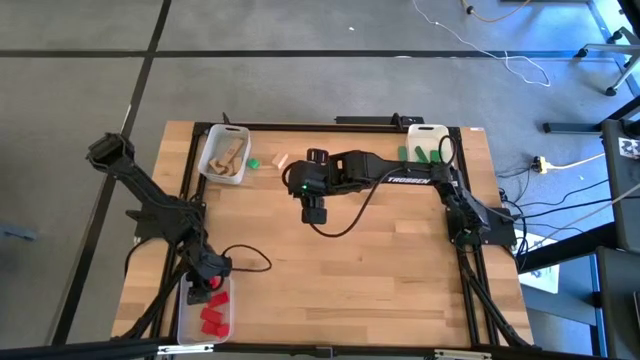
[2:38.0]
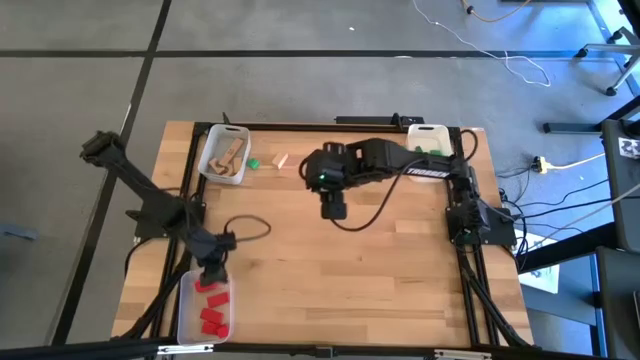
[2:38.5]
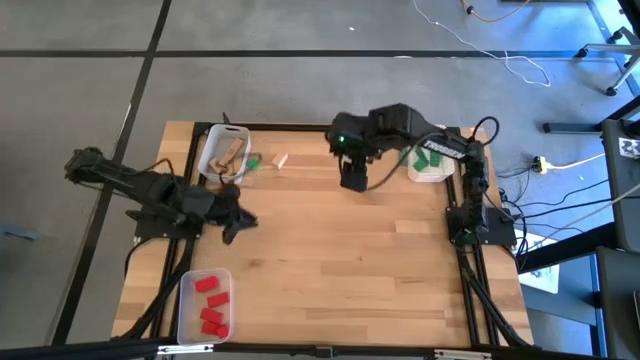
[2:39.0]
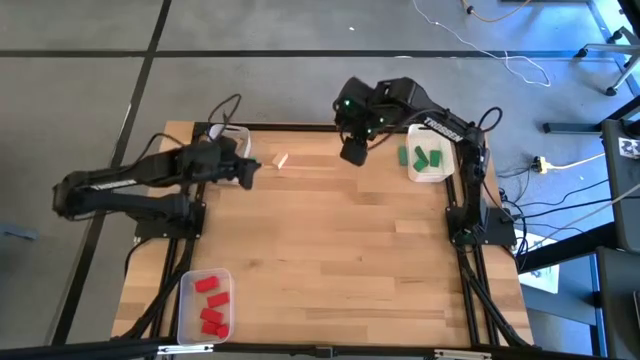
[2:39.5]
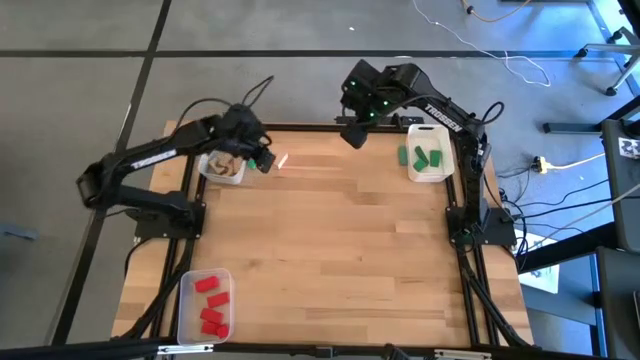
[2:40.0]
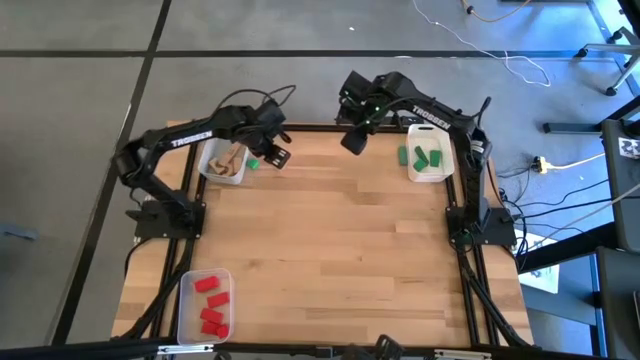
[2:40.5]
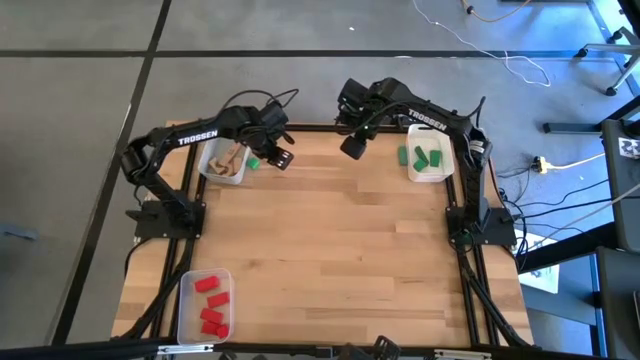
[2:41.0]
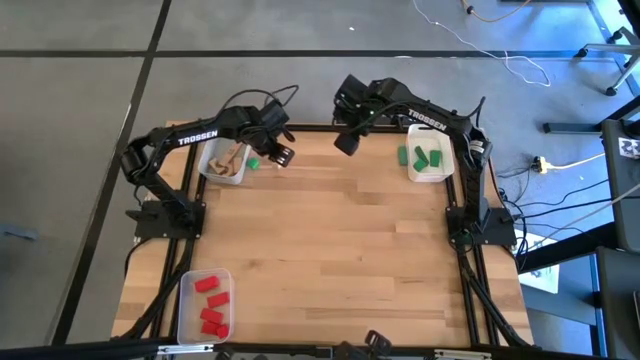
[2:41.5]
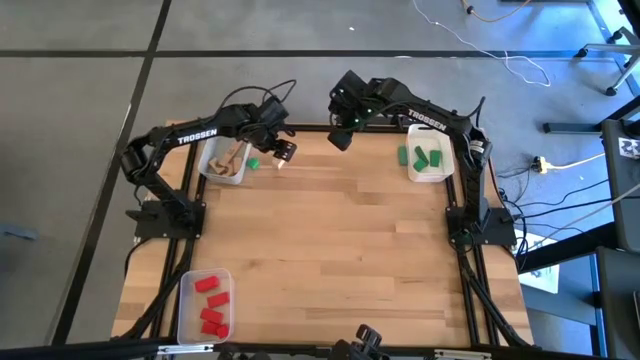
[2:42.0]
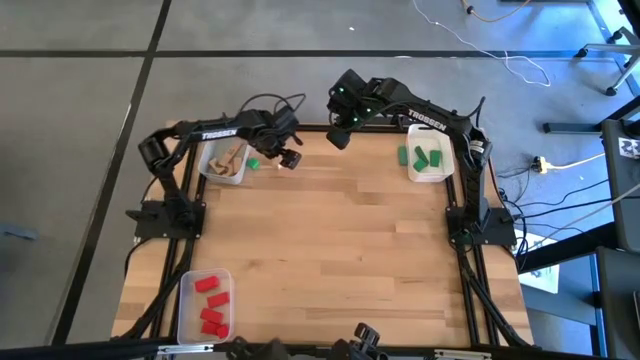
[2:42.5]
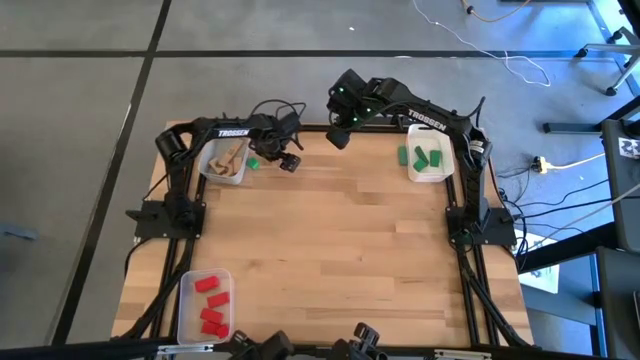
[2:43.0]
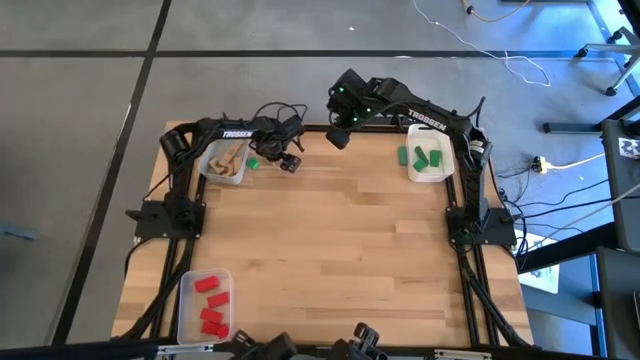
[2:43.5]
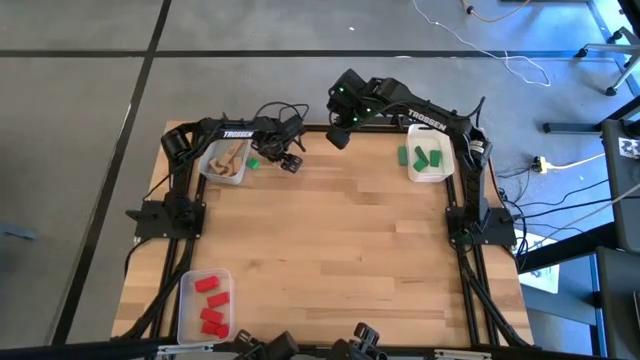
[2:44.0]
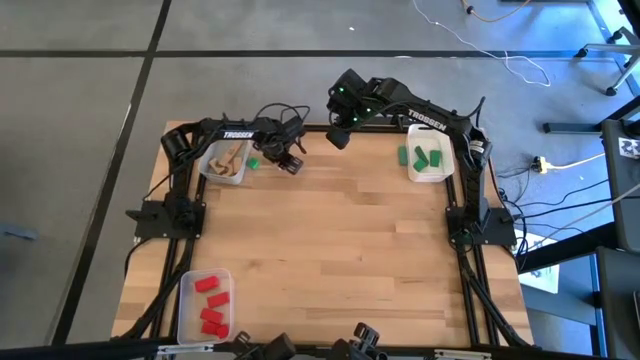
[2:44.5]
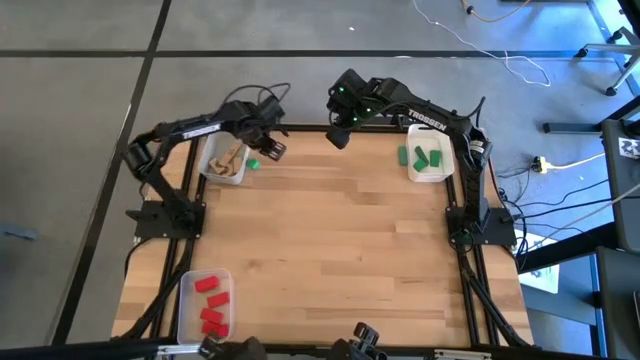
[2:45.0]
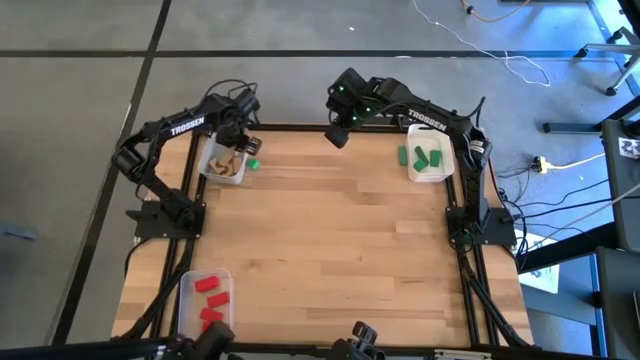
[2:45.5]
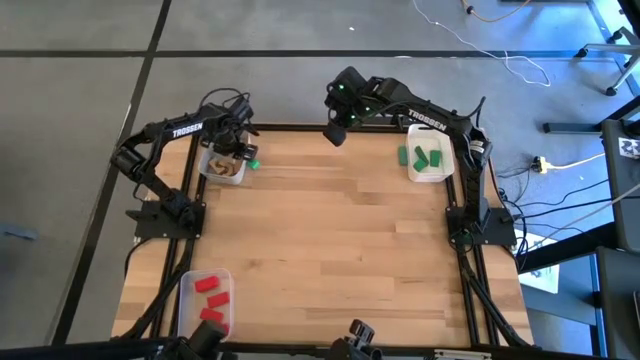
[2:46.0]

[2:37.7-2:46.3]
Task: Sort & place blocks by color
Put the green block into the white bin

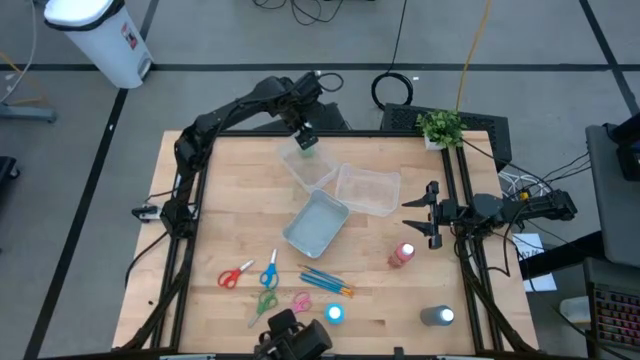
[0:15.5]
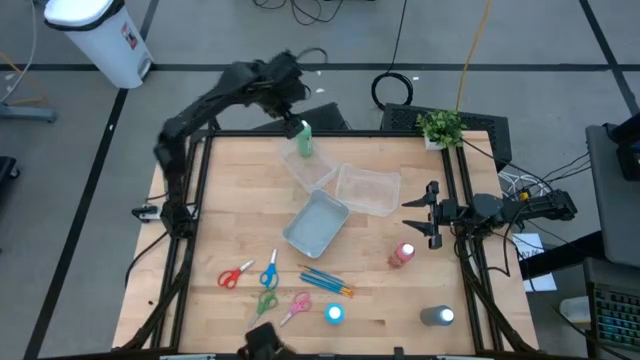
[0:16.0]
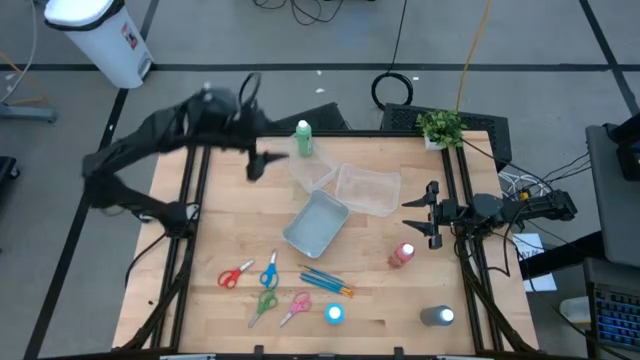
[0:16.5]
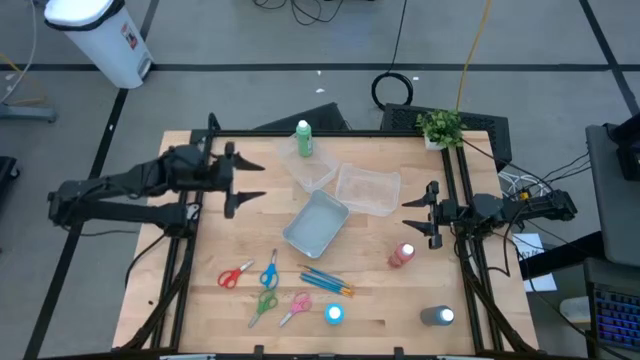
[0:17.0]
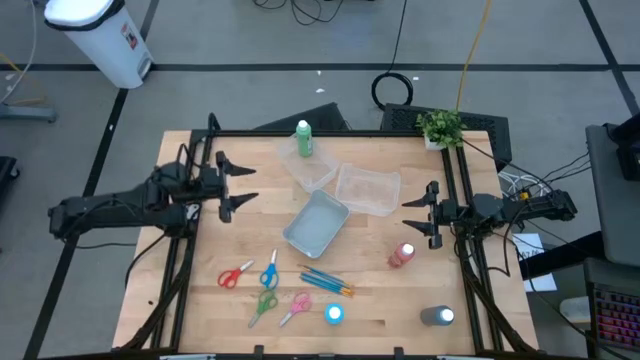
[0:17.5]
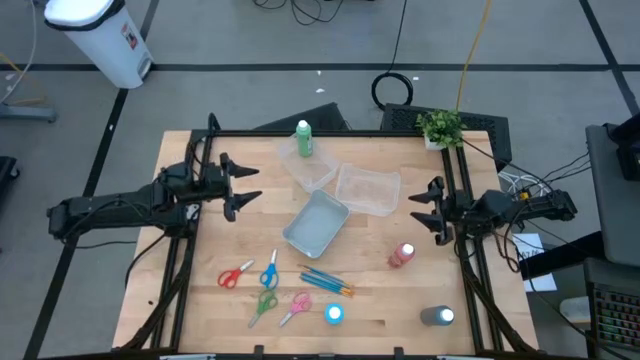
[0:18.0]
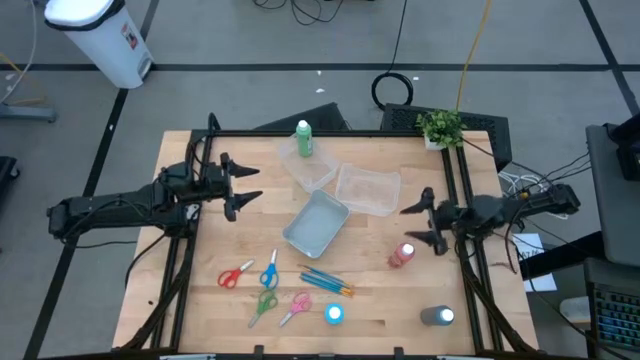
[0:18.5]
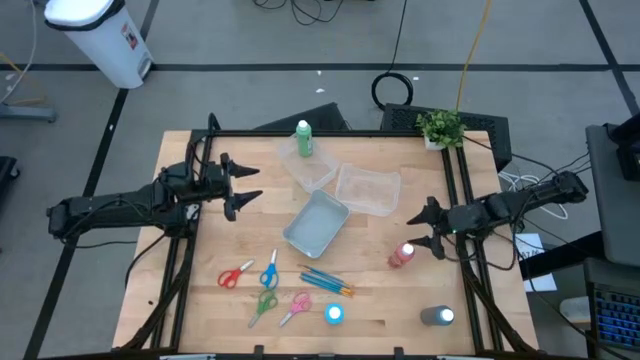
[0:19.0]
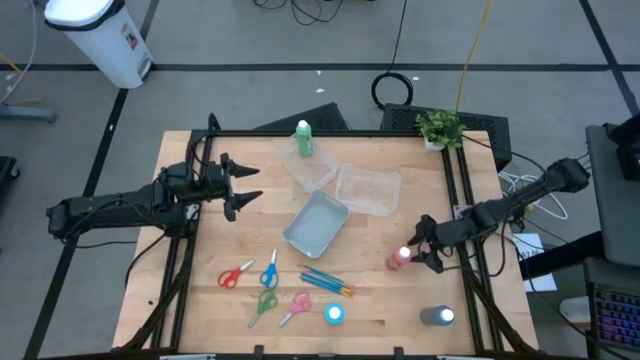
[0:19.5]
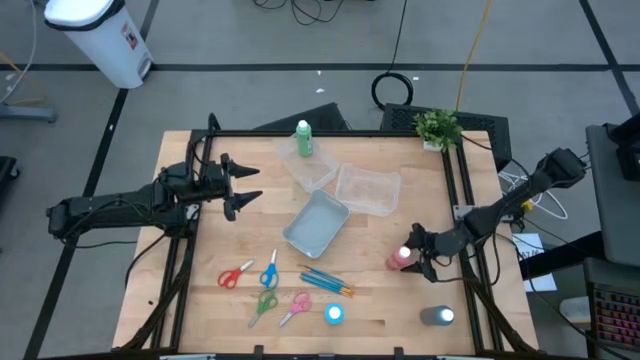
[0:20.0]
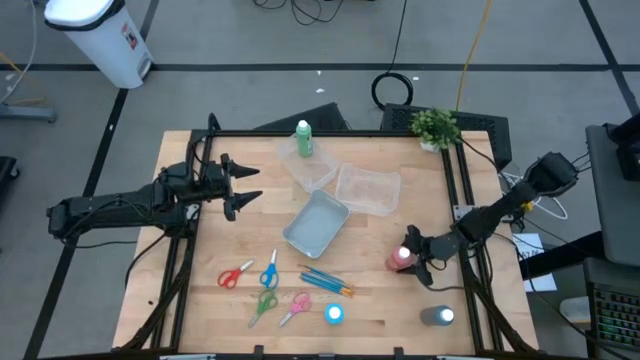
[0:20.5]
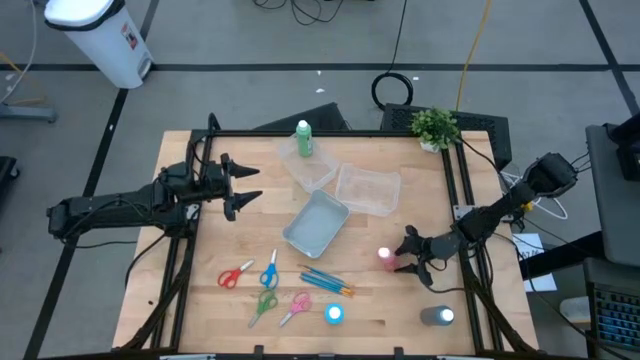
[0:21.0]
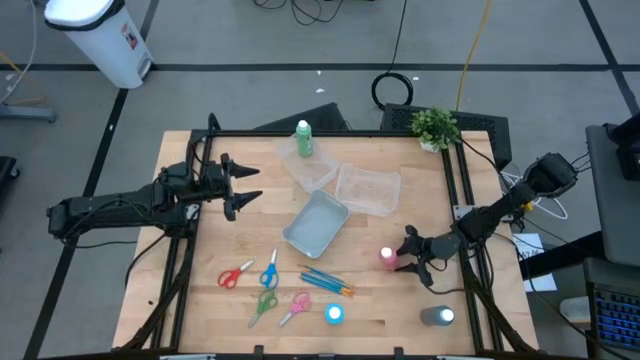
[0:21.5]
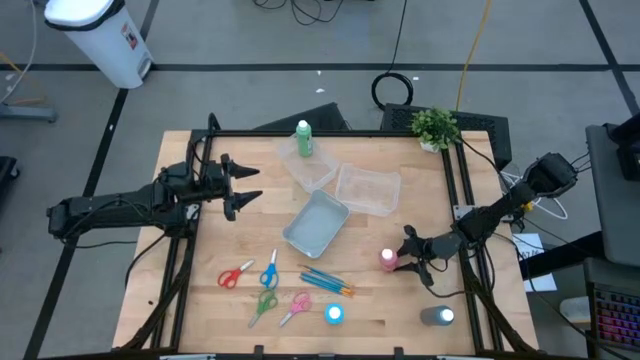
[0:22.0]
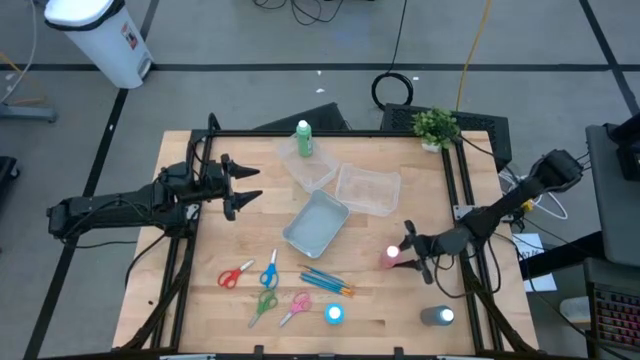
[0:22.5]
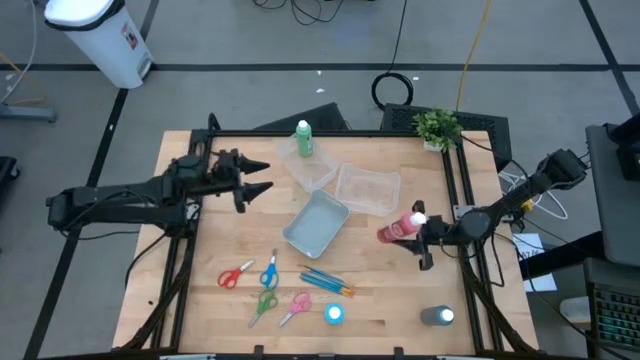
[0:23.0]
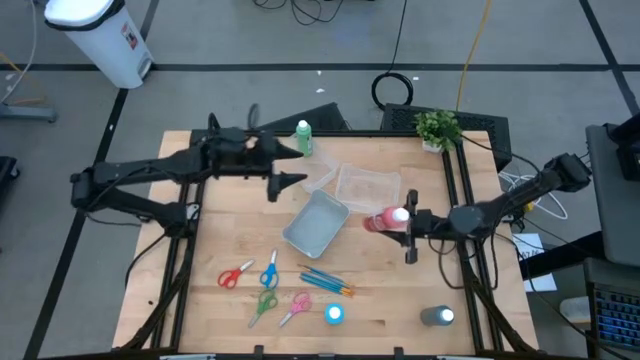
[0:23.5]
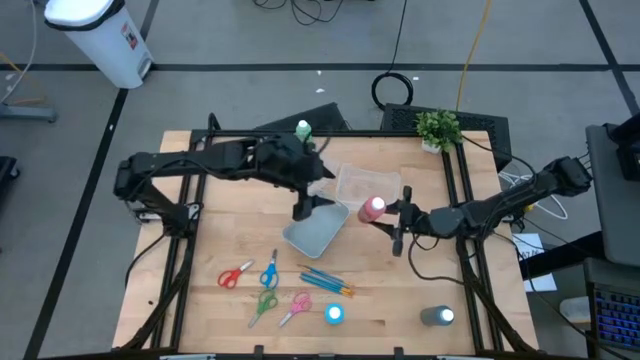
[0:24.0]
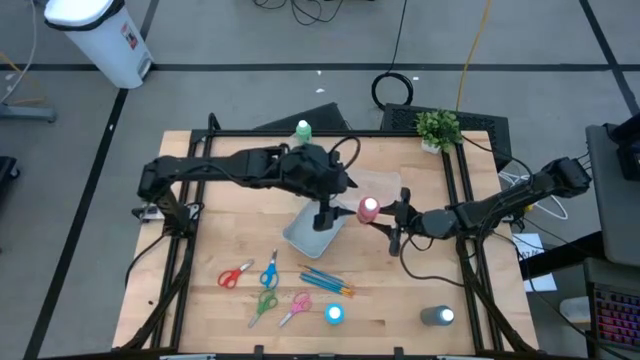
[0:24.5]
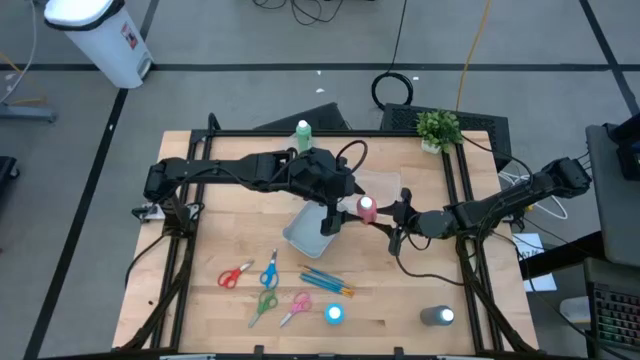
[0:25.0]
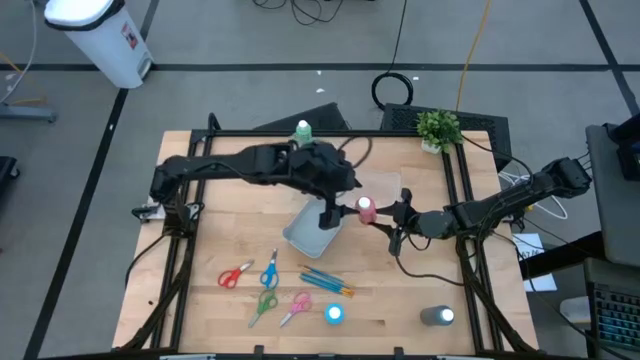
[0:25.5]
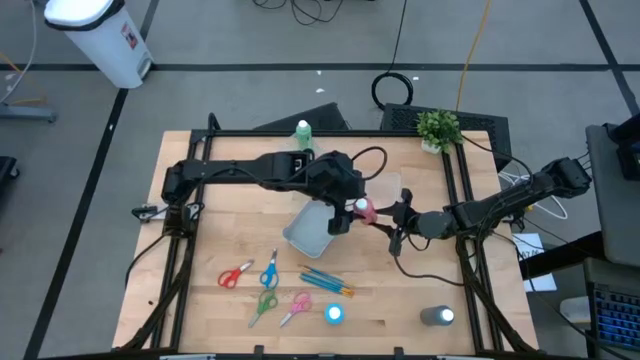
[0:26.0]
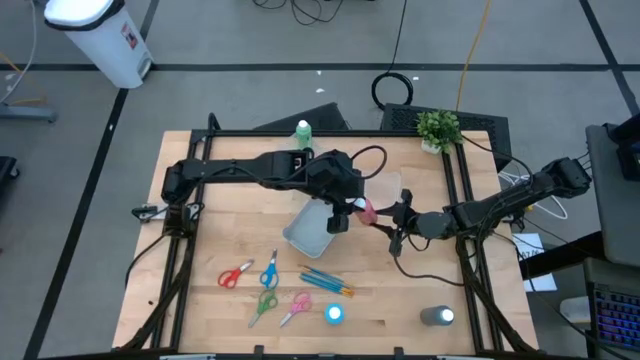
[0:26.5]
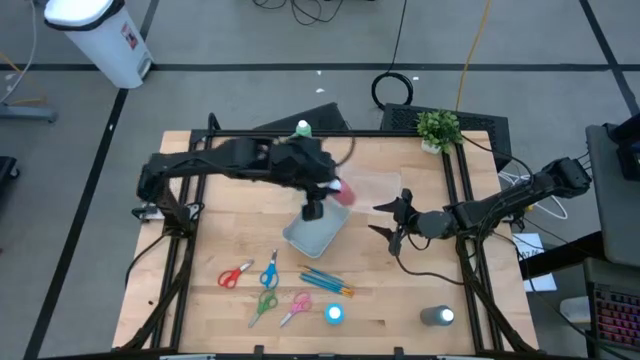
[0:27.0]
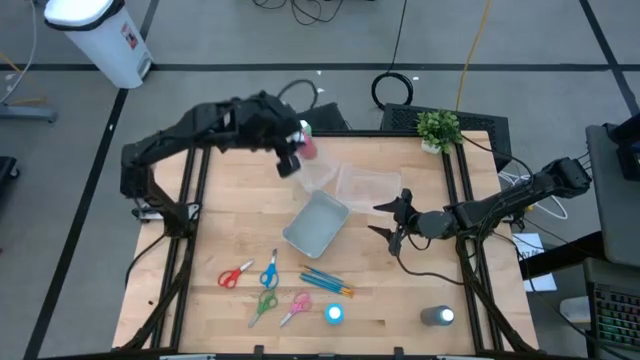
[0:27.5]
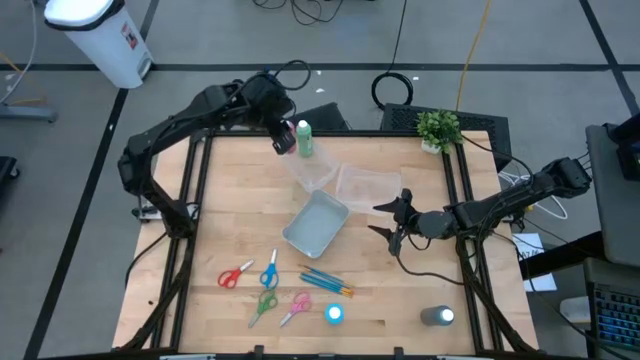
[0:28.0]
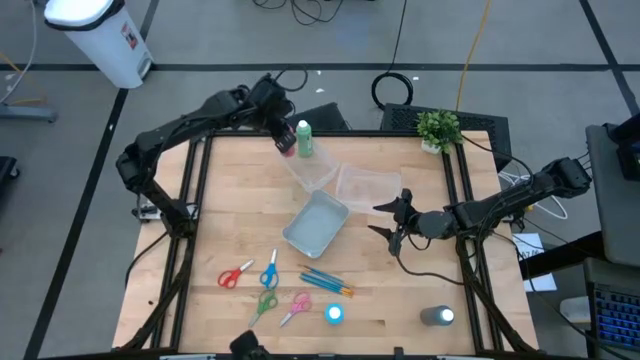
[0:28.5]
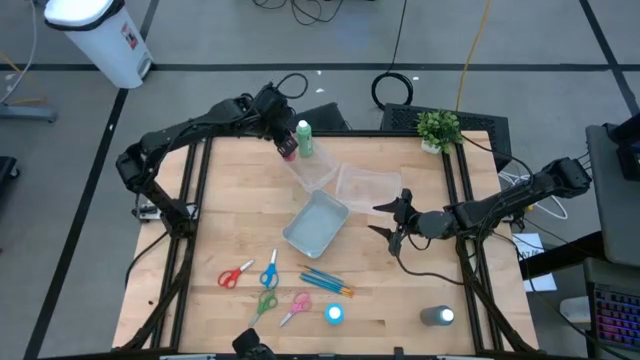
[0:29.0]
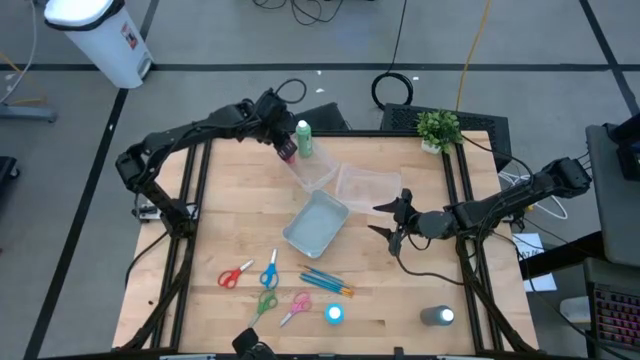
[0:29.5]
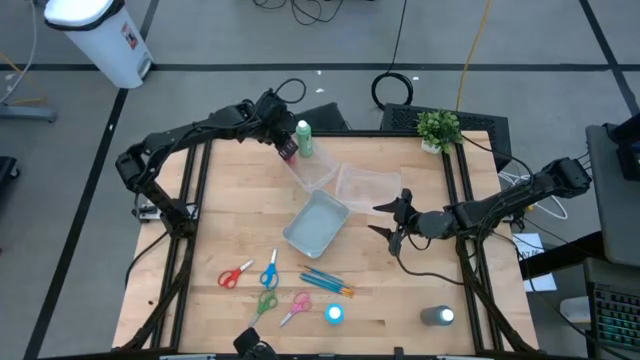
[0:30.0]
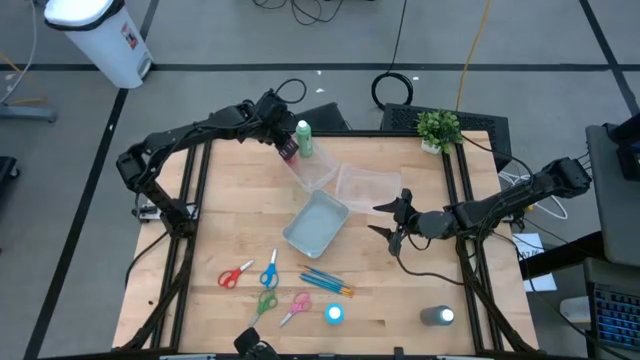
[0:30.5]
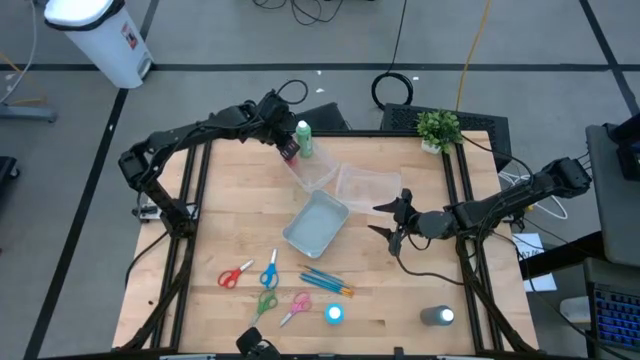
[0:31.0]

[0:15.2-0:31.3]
Task: Pick & Place Paint Supplies
Put the pink paint bottle into the left transparent bin
